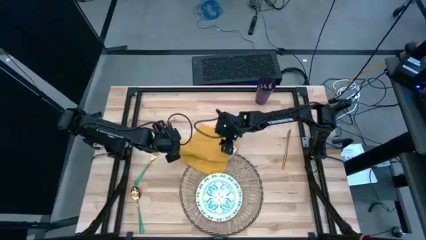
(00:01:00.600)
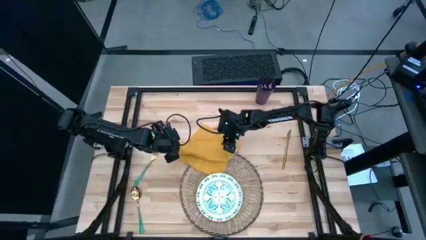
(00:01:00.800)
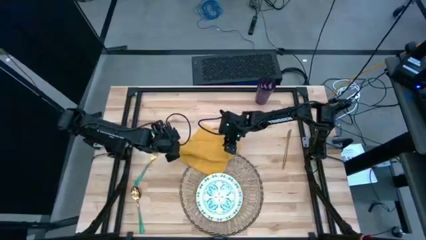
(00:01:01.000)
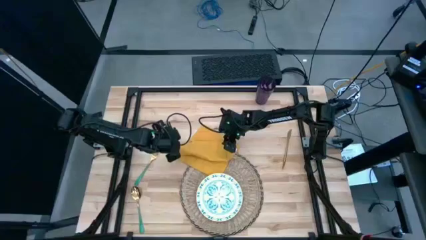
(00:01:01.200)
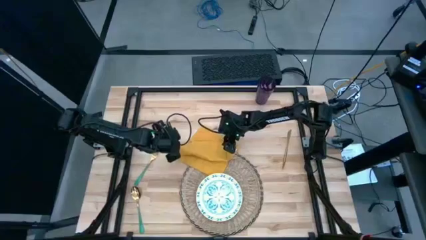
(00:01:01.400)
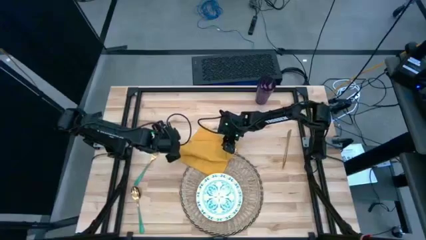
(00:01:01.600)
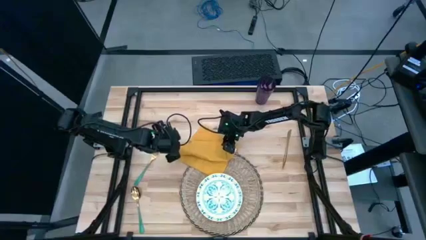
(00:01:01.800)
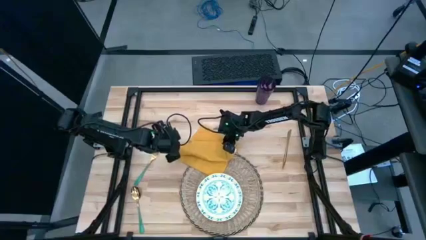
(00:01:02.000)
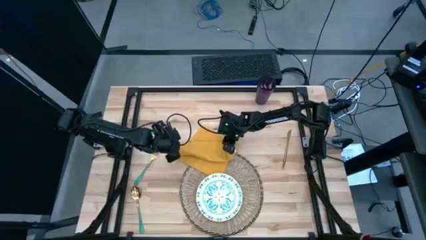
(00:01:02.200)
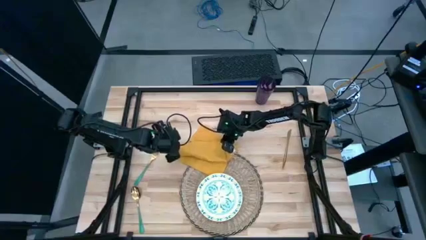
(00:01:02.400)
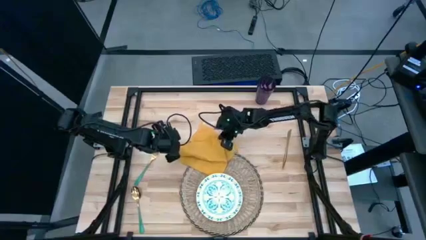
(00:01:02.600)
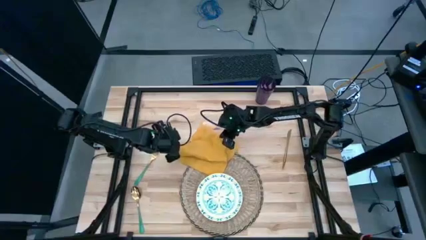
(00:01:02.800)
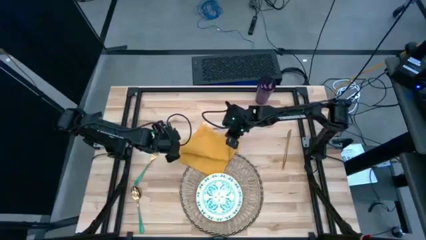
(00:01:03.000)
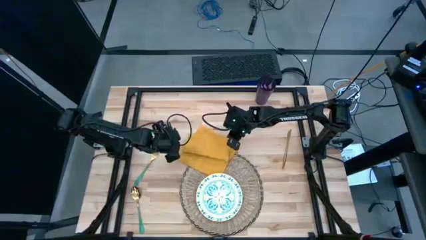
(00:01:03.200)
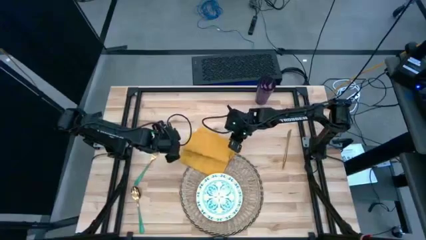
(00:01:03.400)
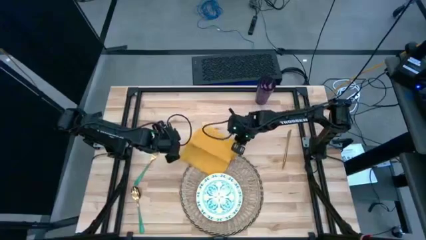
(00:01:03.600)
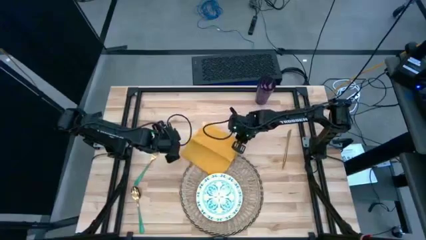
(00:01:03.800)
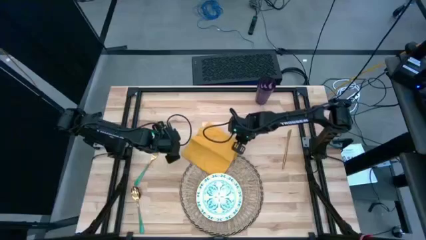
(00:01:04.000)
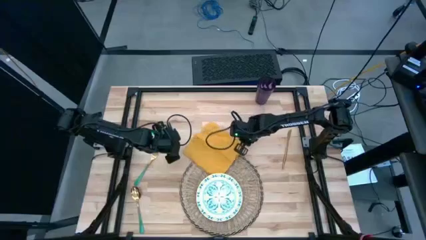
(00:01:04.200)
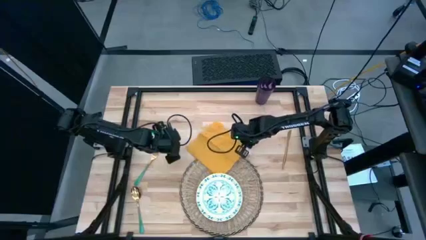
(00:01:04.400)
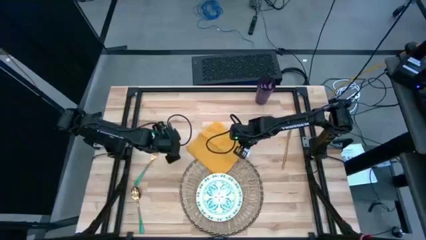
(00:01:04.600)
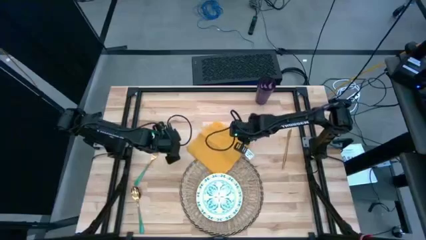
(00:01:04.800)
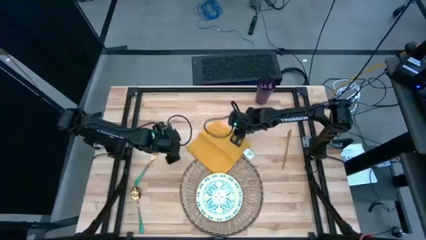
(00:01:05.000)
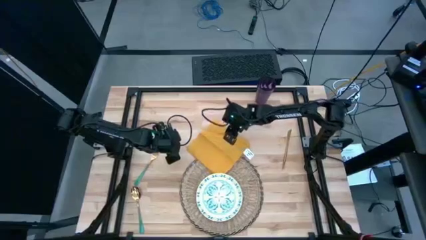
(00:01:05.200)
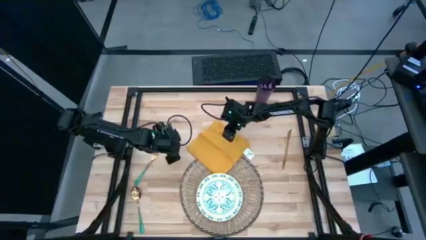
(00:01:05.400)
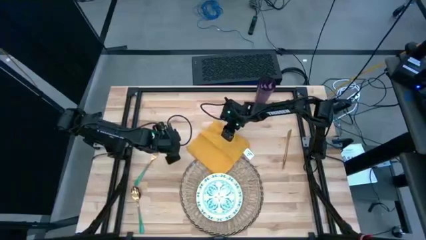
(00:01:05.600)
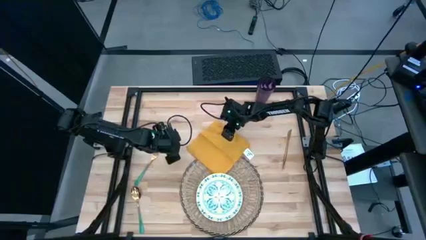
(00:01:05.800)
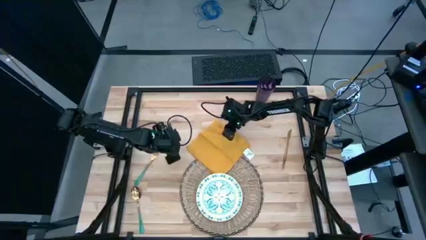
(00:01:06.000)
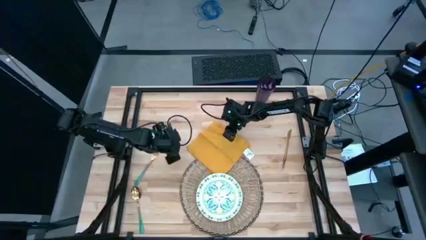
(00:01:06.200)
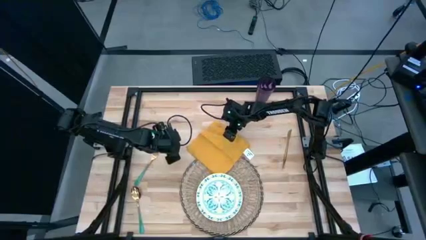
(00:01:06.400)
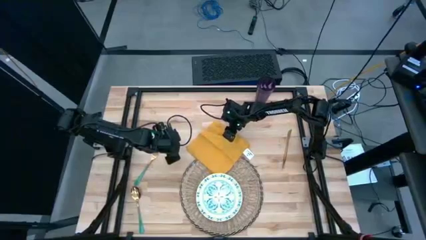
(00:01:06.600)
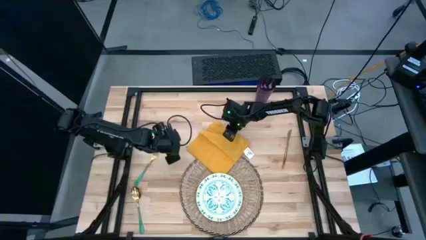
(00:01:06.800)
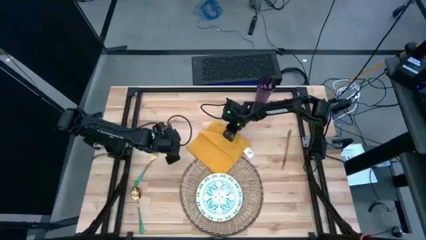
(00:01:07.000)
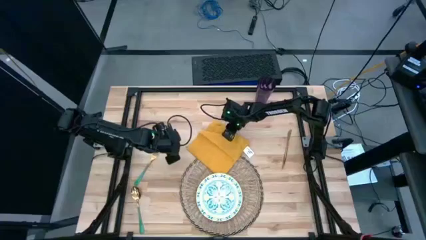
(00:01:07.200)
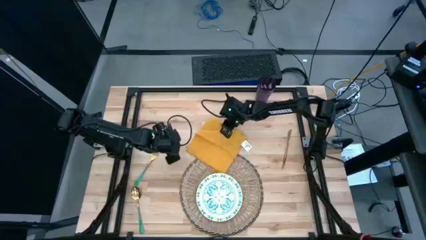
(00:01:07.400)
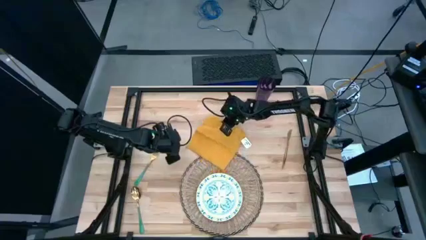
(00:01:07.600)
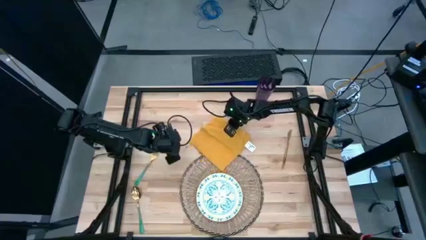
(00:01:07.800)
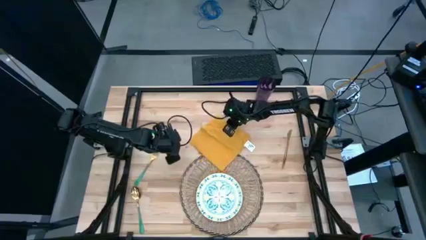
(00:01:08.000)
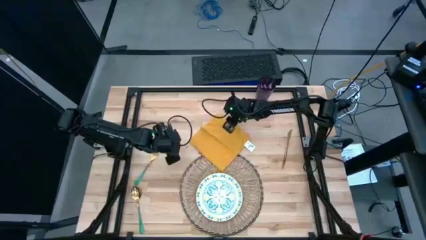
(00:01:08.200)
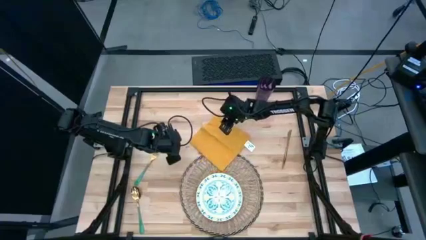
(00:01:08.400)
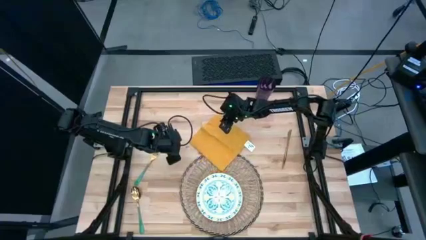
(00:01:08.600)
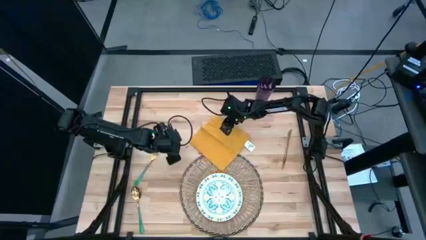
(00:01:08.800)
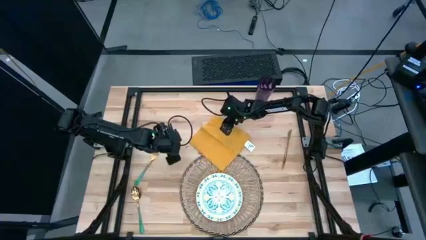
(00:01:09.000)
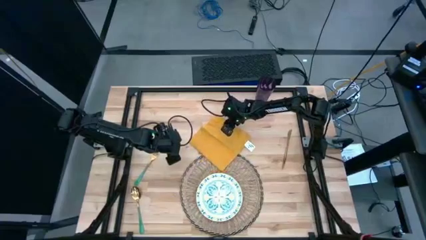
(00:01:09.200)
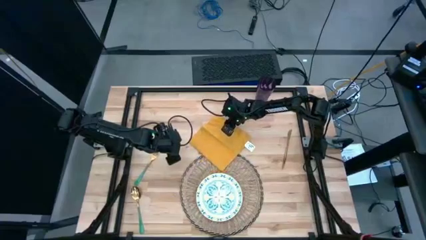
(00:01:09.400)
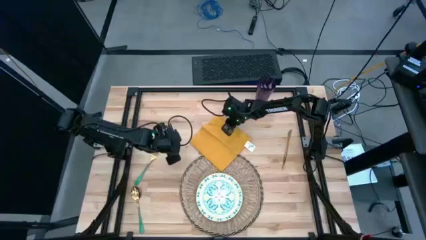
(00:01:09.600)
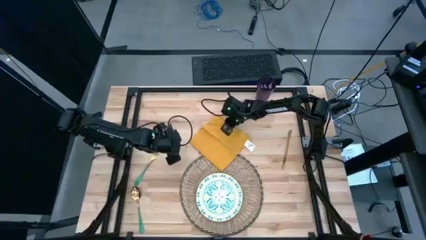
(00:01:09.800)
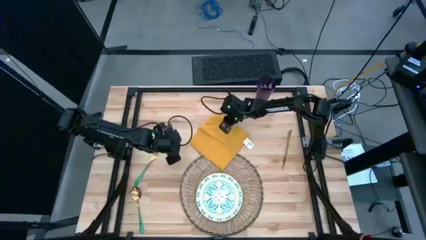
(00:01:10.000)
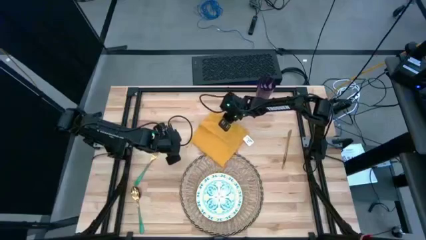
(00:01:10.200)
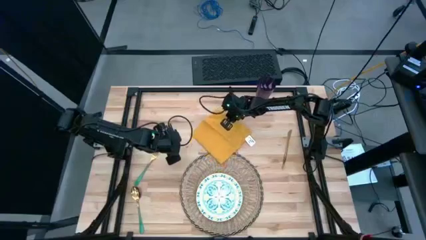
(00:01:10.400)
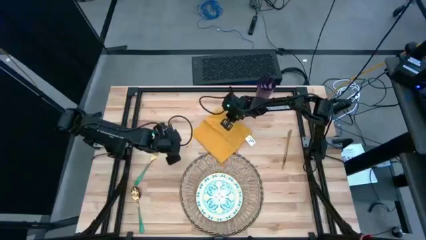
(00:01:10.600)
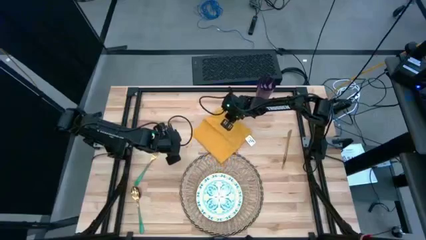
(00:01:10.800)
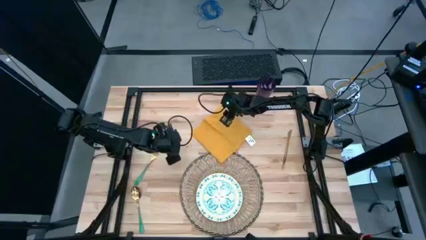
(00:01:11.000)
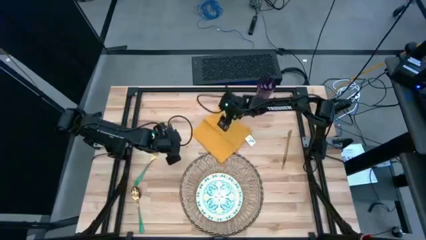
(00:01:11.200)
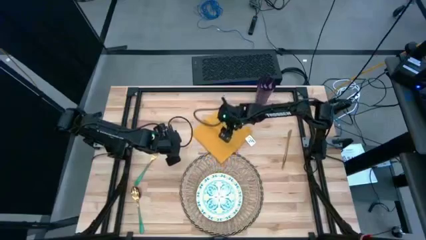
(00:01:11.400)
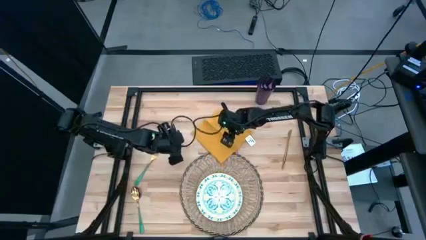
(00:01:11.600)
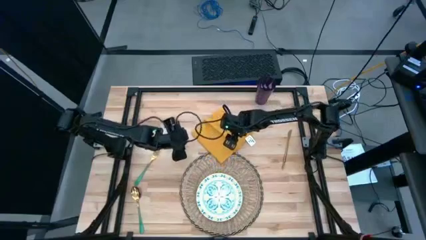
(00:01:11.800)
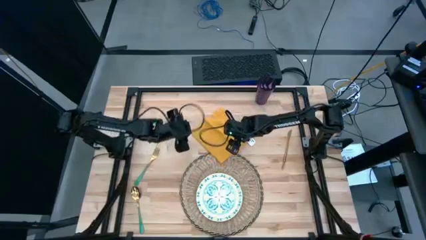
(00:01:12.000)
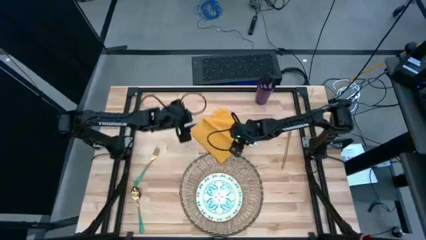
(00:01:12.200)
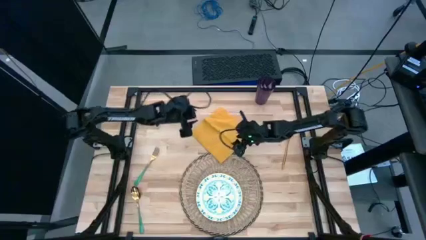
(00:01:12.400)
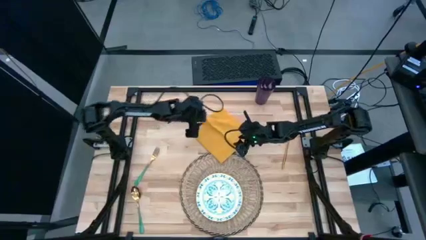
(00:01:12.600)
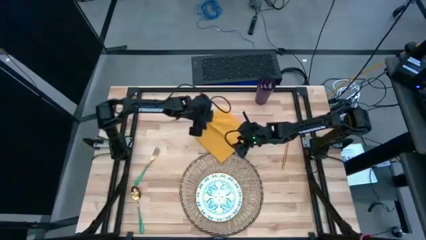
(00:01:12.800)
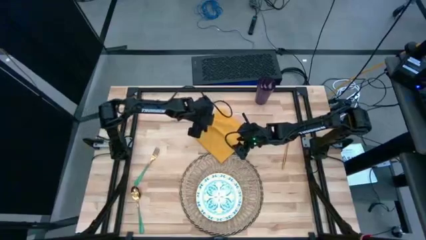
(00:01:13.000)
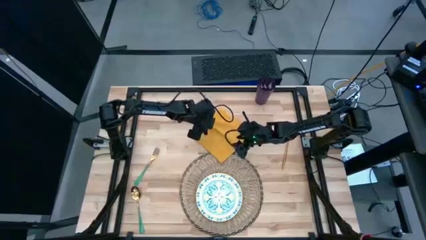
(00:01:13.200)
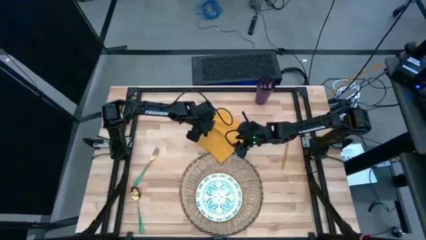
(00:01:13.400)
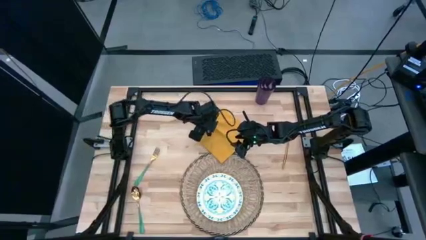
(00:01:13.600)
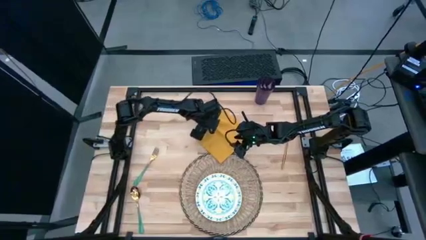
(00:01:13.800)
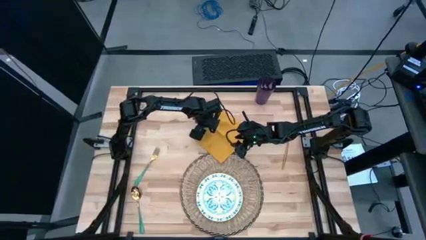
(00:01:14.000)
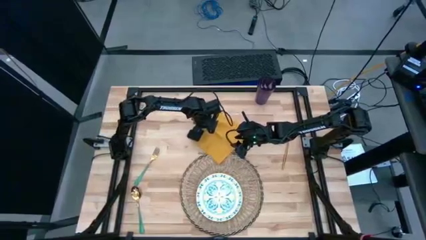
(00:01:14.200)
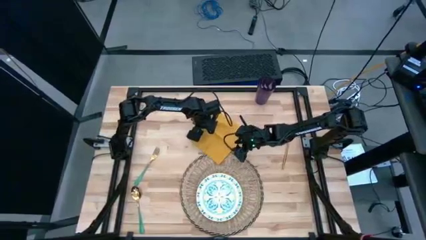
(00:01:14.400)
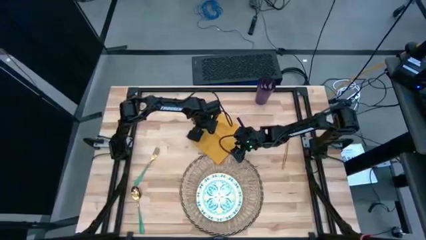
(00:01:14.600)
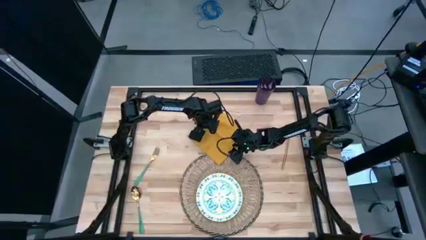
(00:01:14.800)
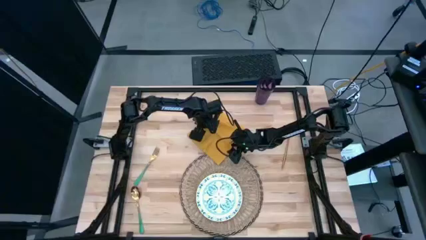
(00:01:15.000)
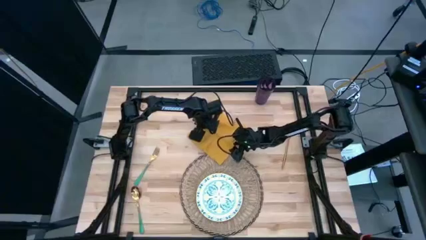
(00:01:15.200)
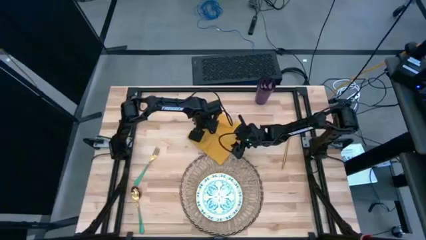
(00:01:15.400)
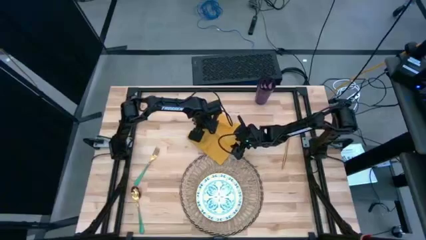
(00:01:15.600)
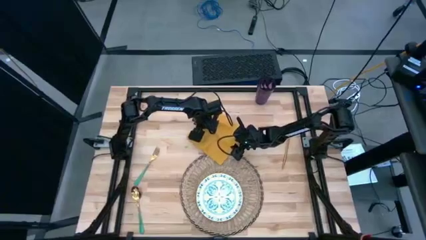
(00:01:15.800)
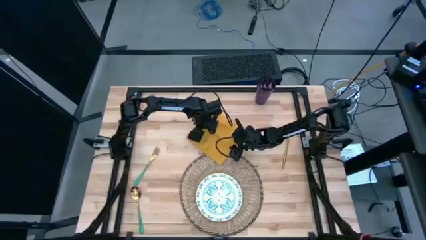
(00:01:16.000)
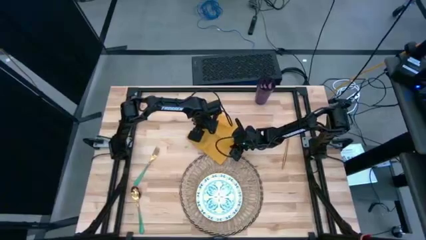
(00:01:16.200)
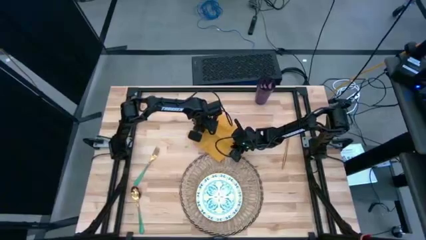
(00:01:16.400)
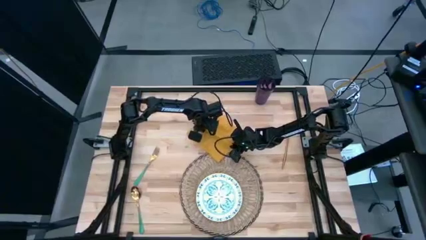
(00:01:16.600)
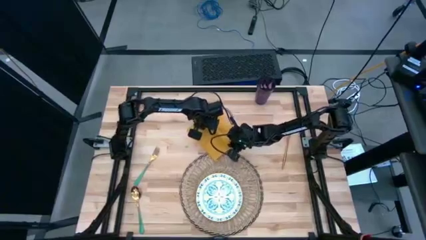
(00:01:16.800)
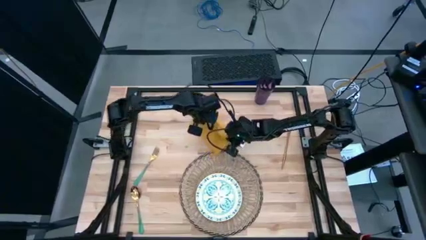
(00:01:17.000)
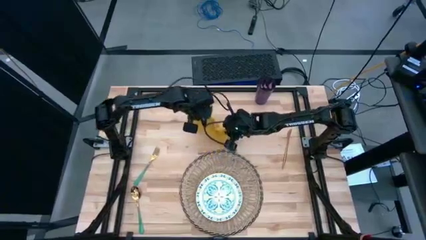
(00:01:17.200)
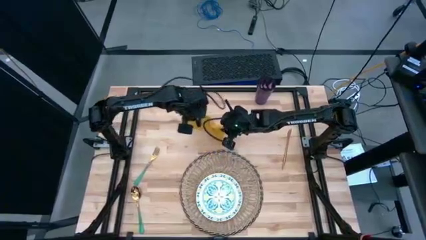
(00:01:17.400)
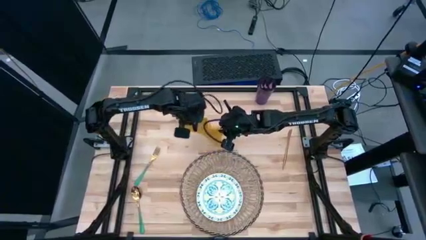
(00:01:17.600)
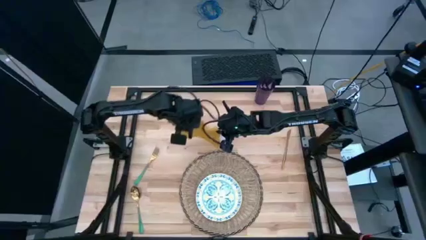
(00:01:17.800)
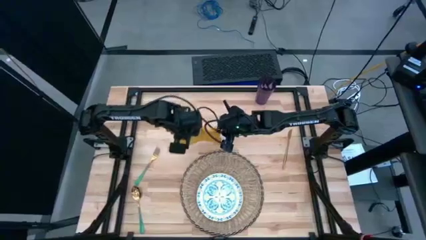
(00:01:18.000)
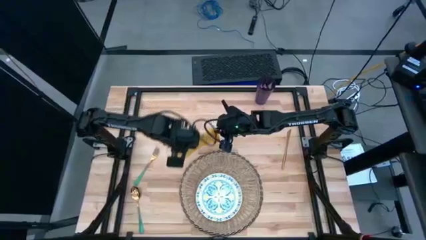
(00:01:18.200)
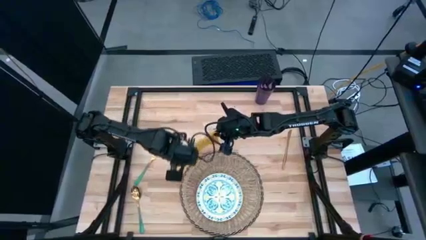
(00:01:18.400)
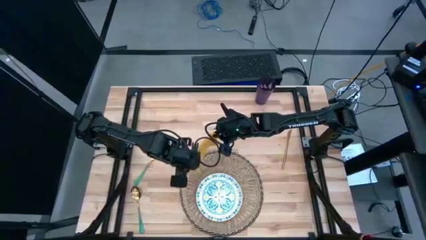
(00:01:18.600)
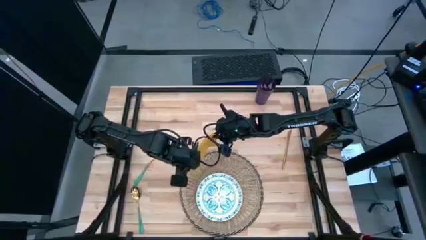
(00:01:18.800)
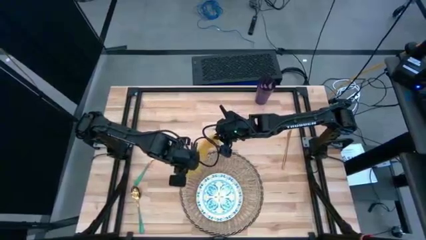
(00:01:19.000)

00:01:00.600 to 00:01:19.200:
Task: Set table place
Fold the yellow napkin
